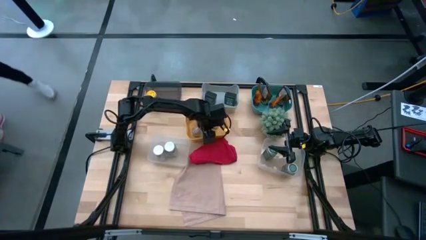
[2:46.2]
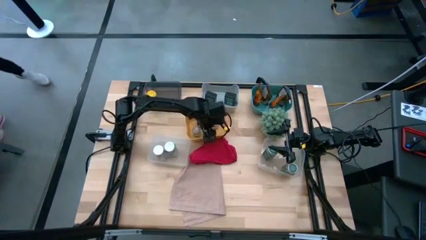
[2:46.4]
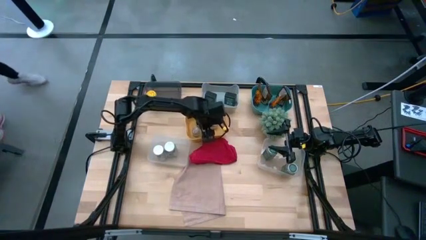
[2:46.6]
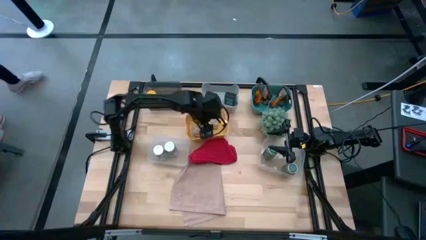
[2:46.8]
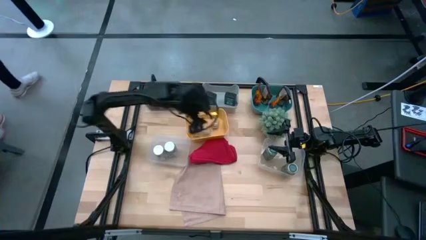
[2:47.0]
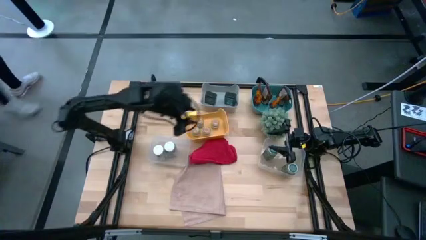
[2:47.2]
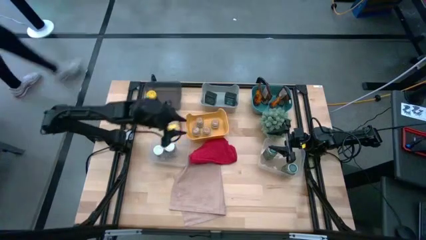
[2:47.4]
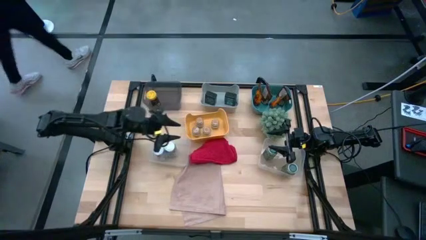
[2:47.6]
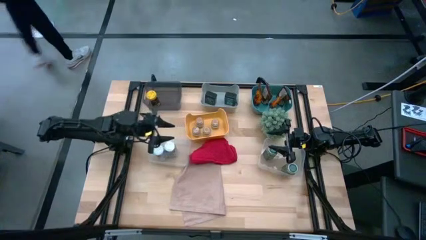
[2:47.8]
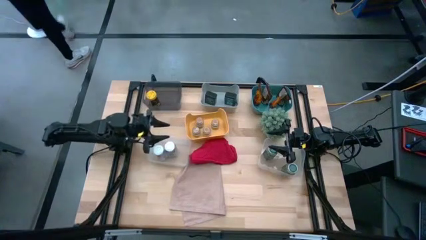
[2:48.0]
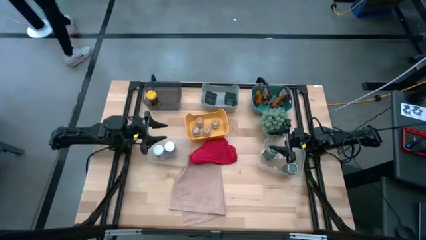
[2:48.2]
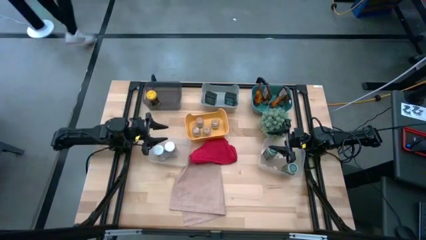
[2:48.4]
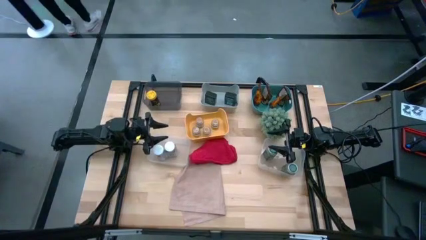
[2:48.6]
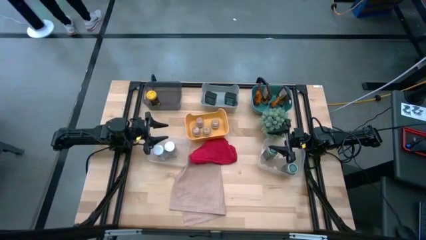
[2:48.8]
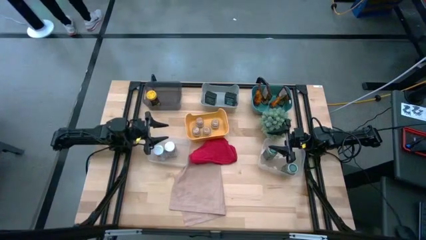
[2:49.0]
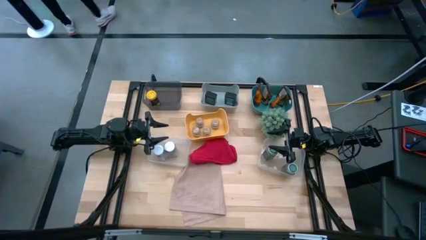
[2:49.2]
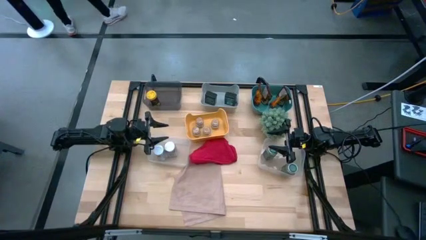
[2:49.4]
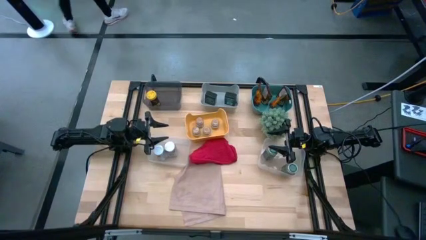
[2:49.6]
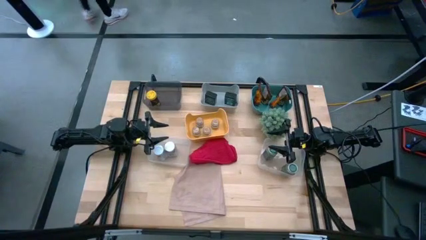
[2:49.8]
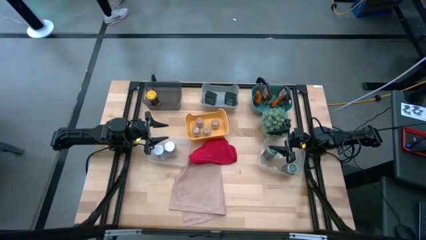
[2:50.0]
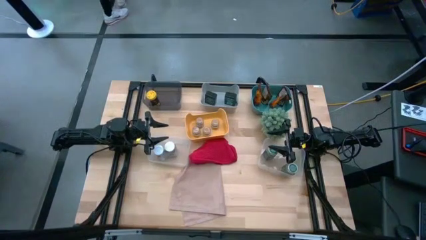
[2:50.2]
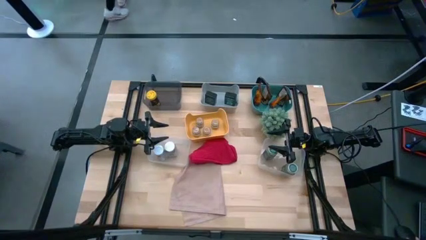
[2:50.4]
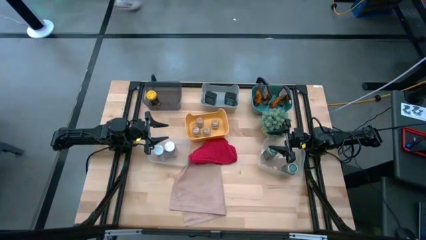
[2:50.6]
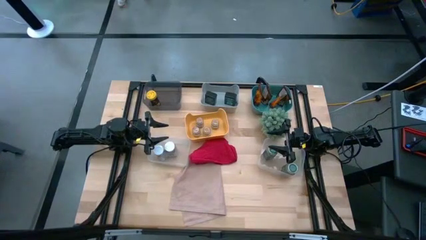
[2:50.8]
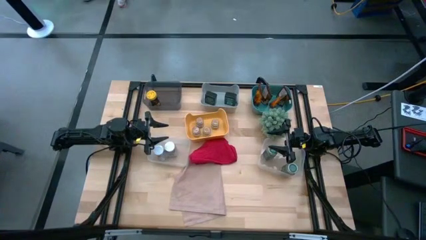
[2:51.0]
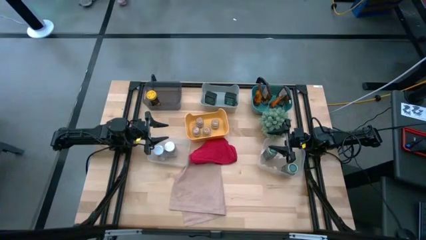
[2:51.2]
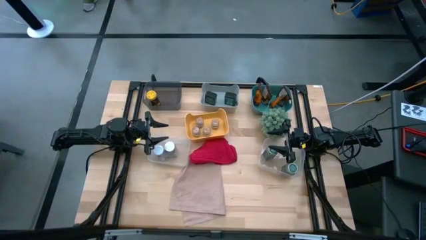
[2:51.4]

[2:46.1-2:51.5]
Task: Sort spices by type
Return to Home Position

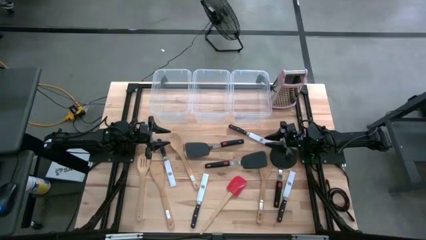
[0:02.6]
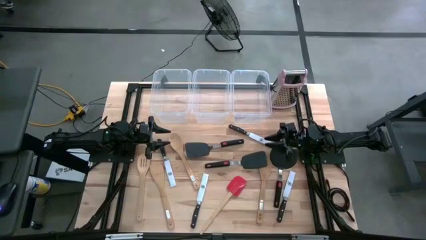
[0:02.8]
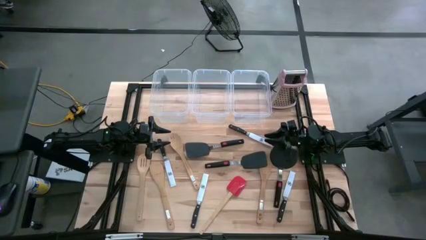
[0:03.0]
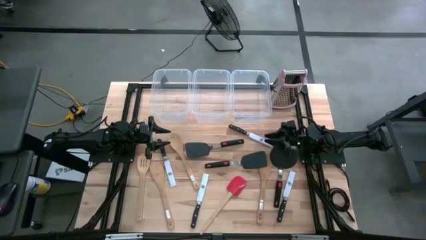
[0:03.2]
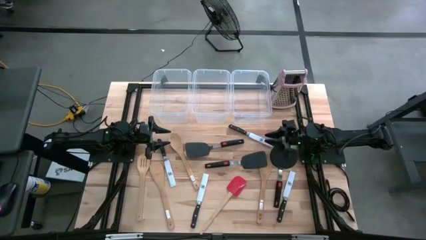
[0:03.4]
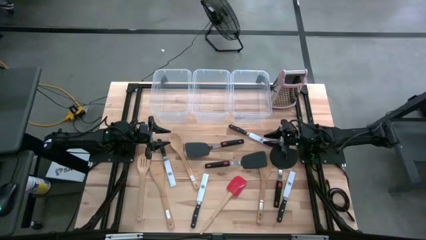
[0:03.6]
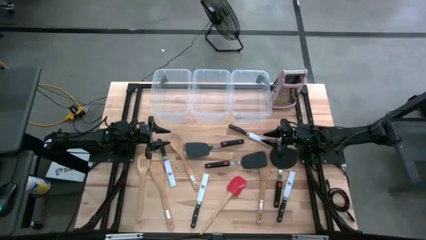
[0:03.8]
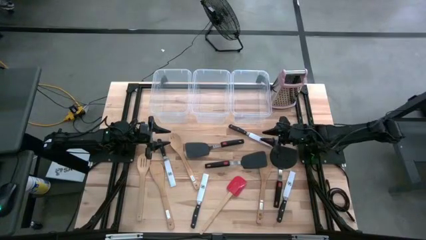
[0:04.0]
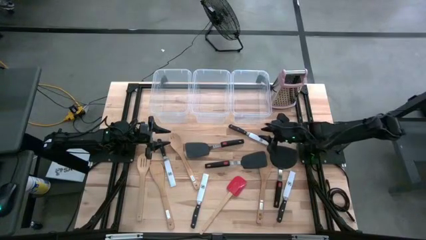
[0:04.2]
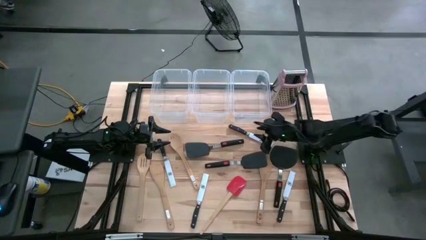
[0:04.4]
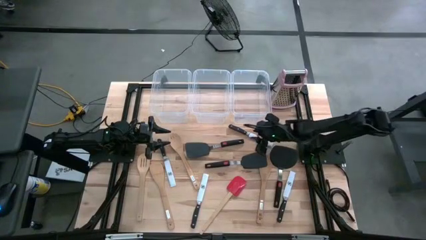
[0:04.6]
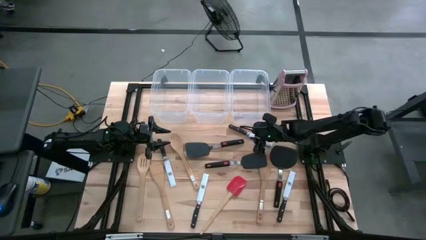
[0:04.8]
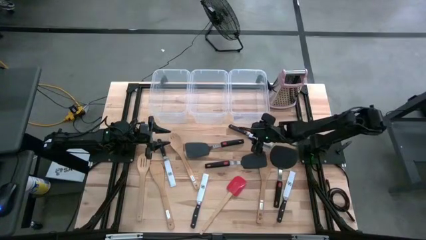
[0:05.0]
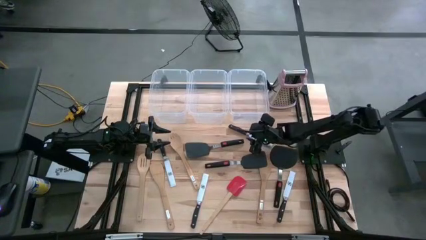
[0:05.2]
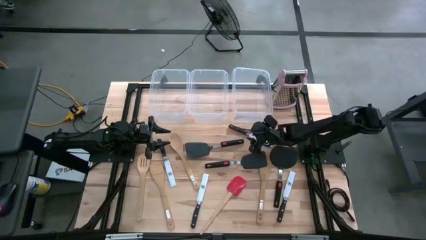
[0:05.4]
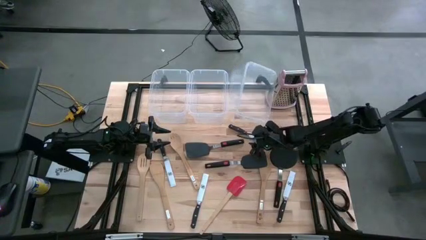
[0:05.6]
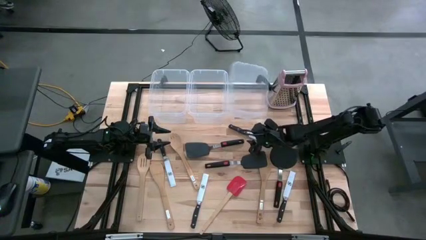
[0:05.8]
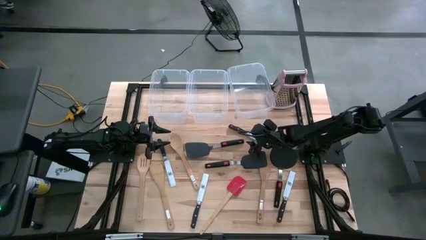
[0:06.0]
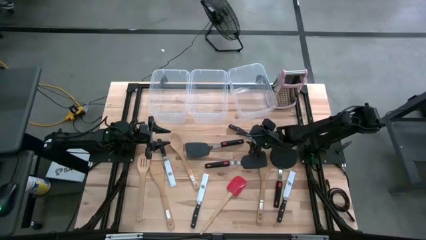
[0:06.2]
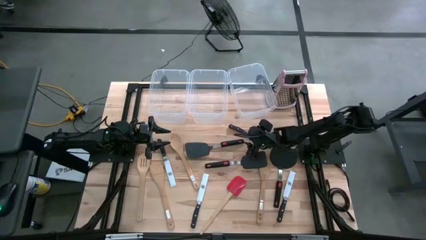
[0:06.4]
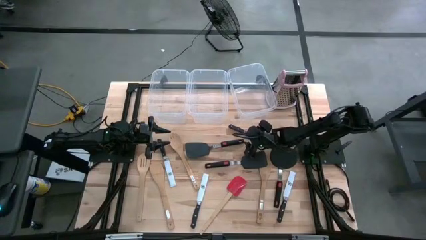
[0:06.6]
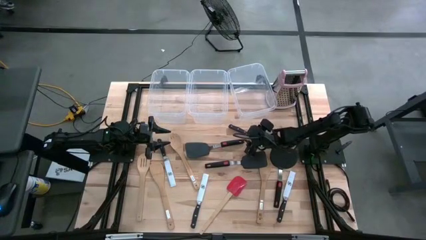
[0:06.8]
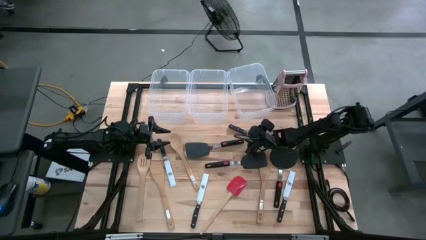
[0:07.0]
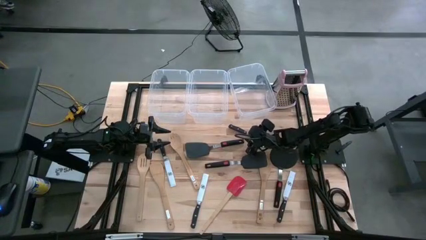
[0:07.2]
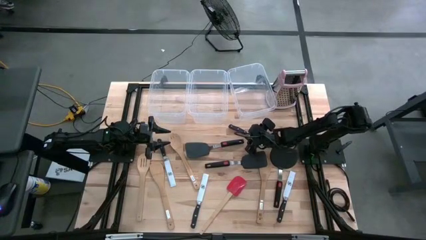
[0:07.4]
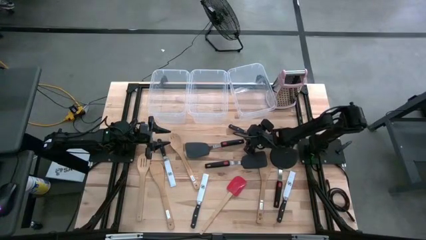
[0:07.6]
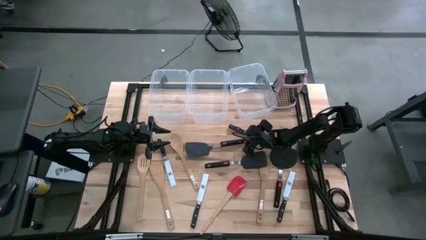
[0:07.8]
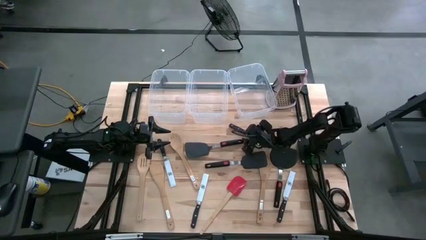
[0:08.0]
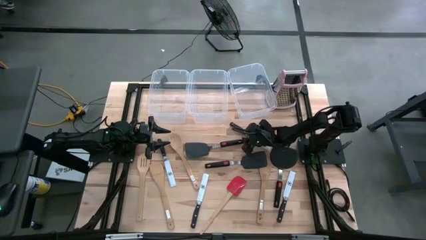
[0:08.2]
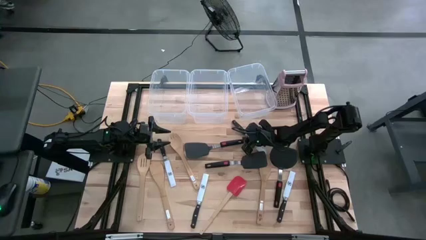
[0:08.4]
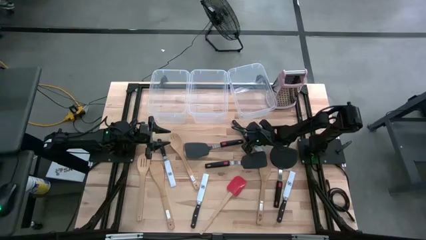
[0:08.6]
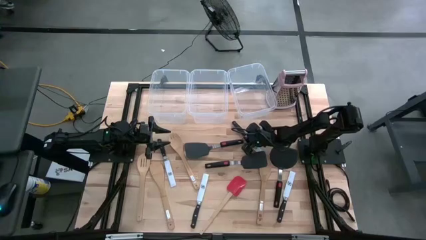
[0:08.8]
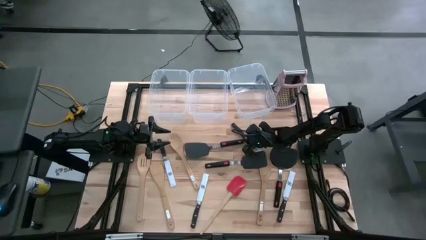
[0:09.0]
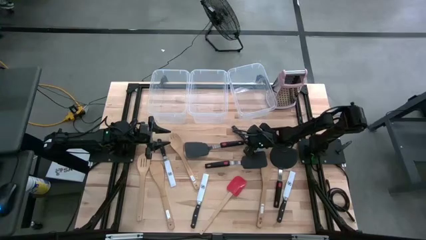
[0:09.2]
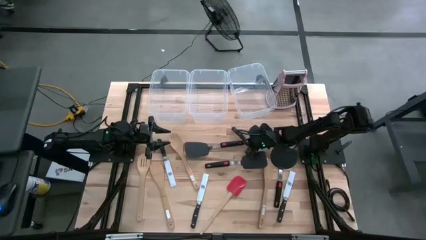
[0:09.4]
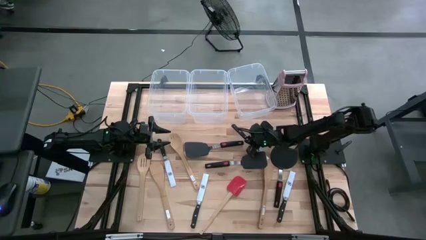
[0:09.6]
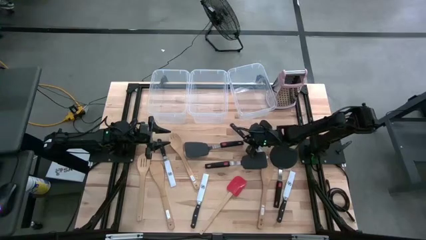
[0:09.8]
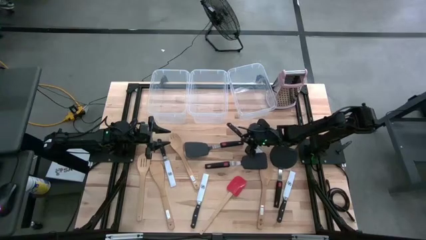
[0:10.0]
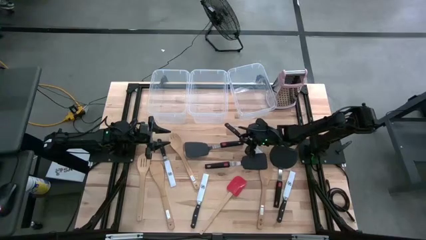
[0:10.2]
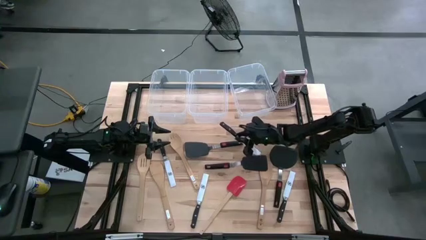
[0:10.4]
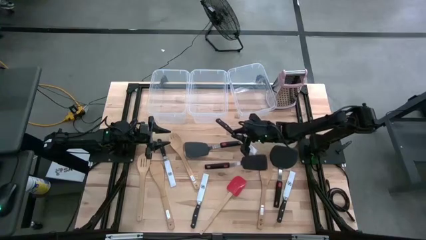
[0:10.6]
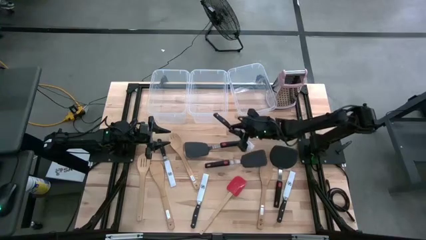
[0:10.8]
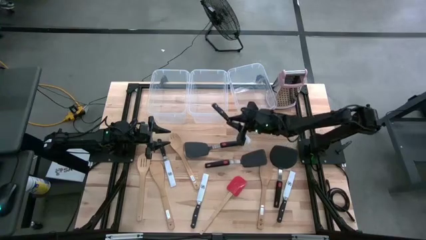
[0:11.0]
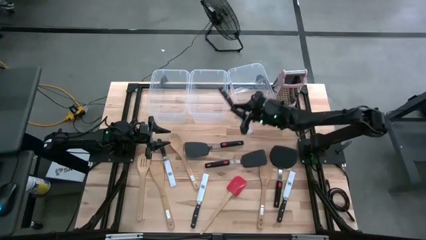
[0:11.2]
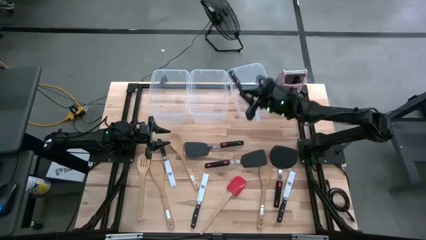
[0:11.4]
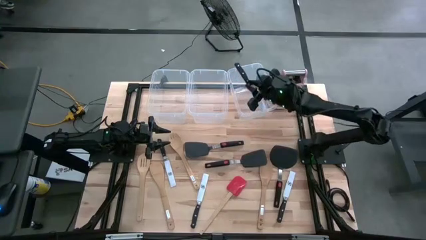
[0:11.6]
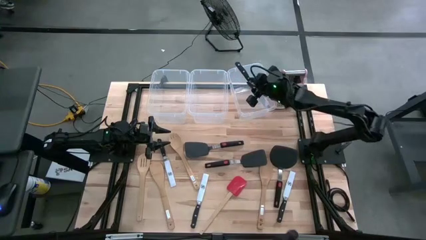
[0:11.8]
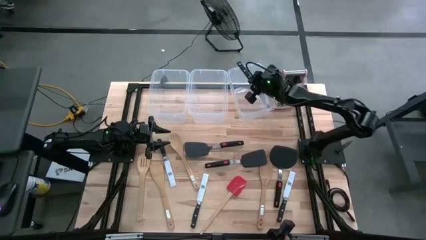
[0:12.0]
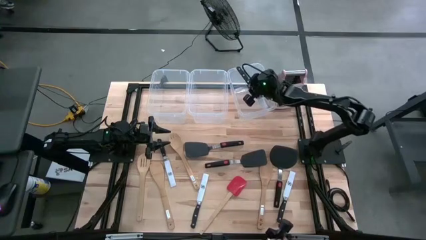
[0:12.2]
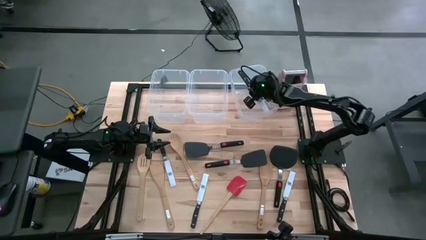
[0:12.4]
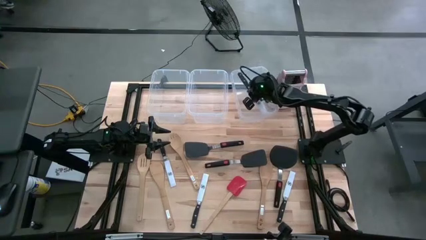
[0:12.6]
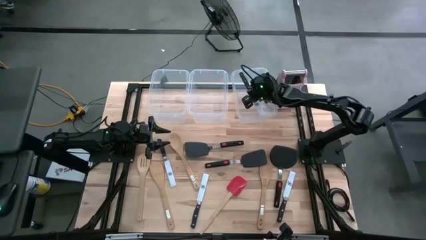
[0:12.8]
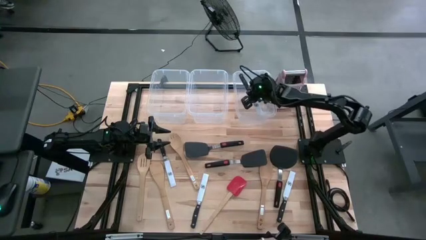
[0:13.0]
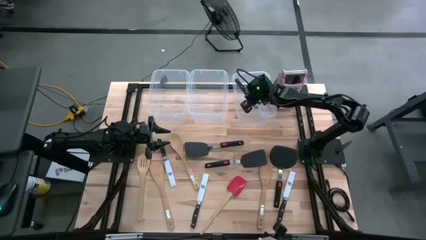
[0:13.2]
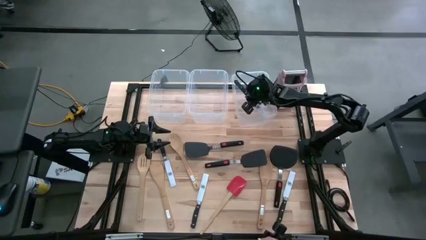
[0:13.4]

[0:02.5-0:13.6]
Task: Pick & Place Kitchen Items
Put the black knife into the right bin
